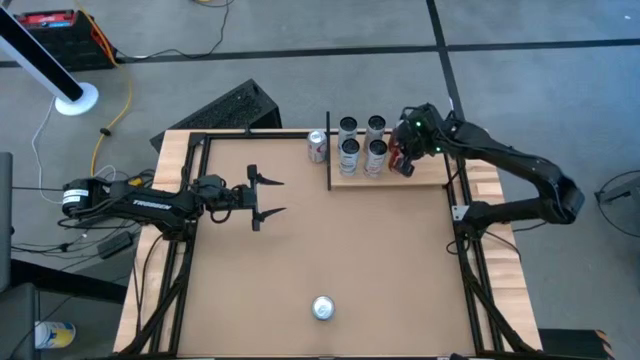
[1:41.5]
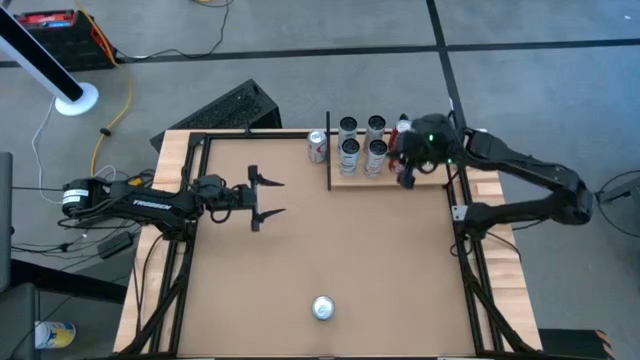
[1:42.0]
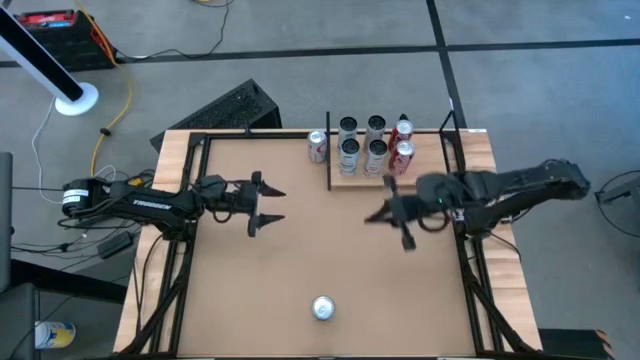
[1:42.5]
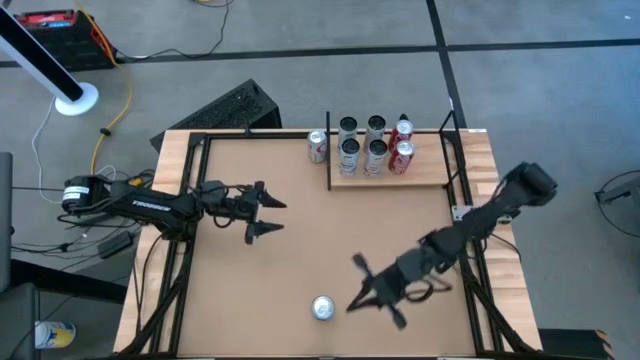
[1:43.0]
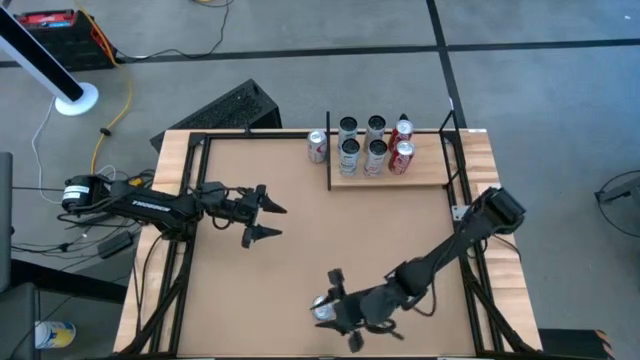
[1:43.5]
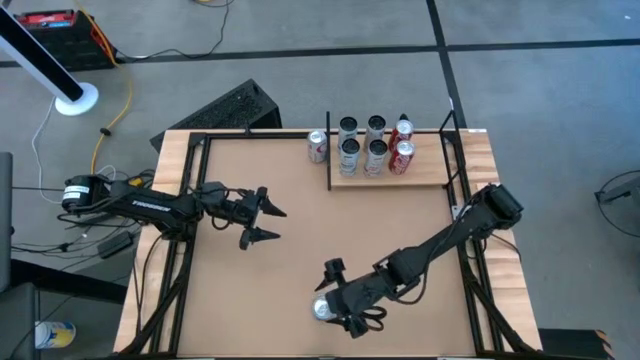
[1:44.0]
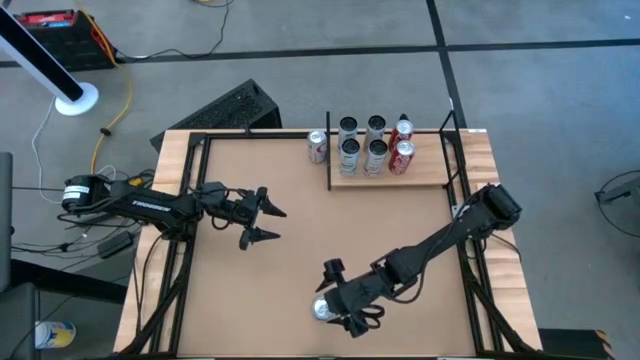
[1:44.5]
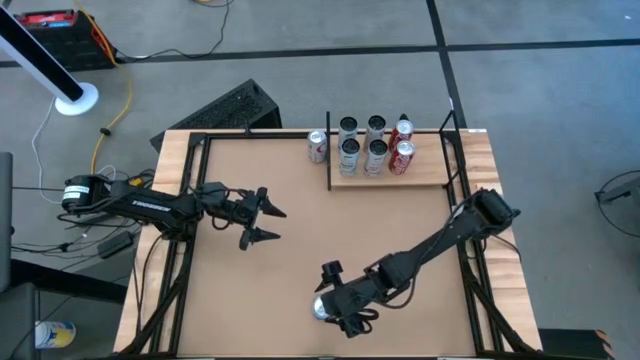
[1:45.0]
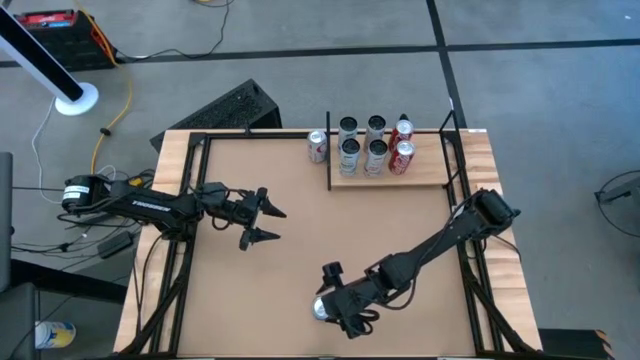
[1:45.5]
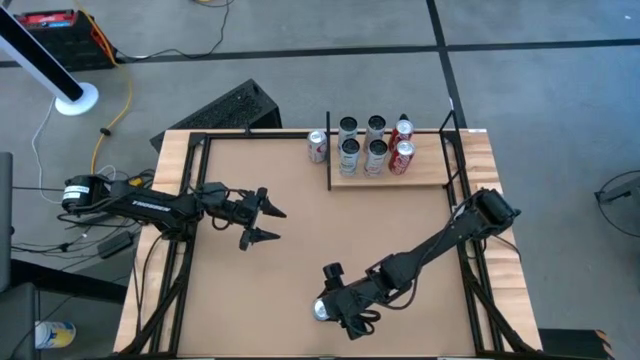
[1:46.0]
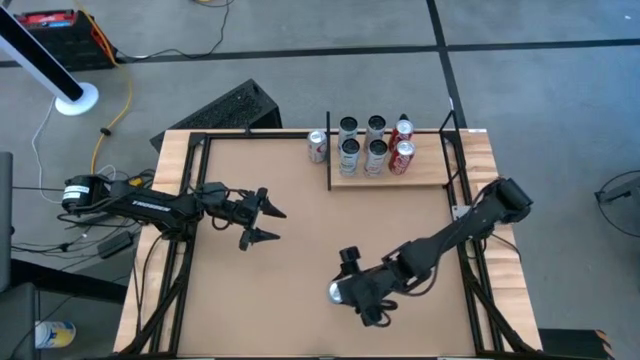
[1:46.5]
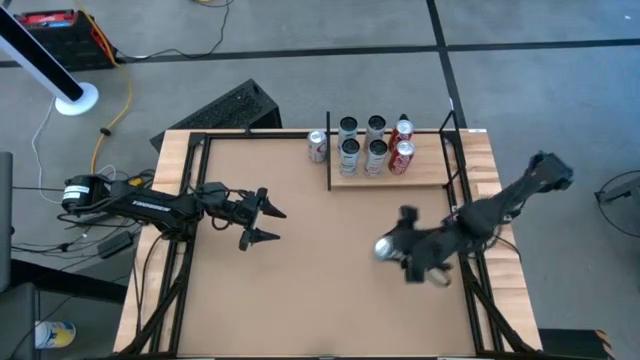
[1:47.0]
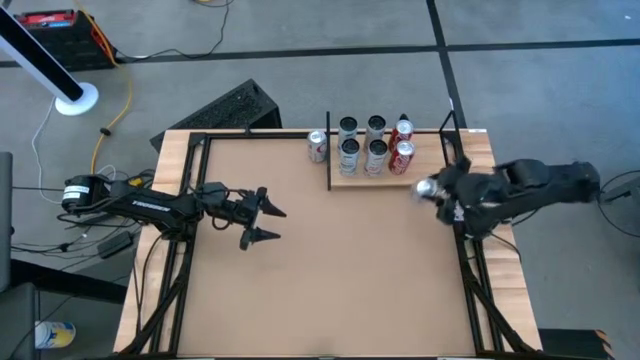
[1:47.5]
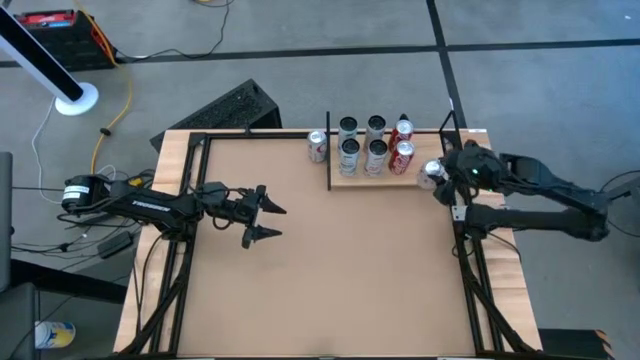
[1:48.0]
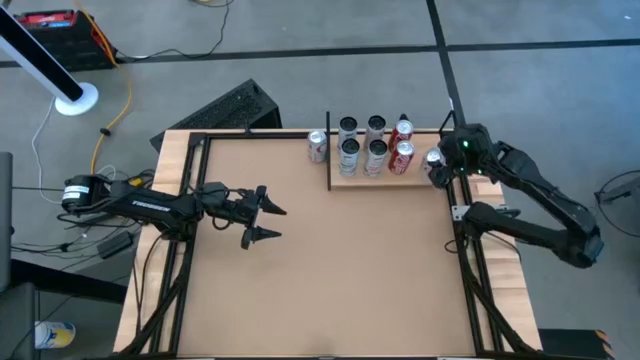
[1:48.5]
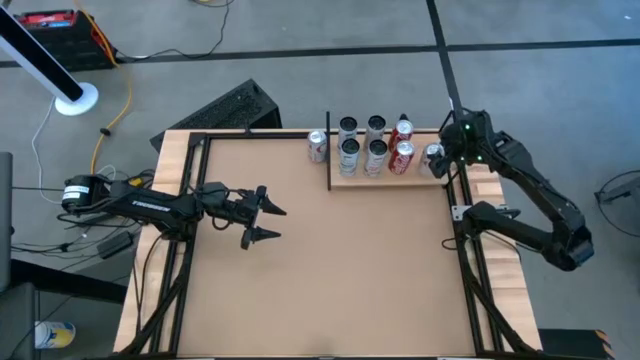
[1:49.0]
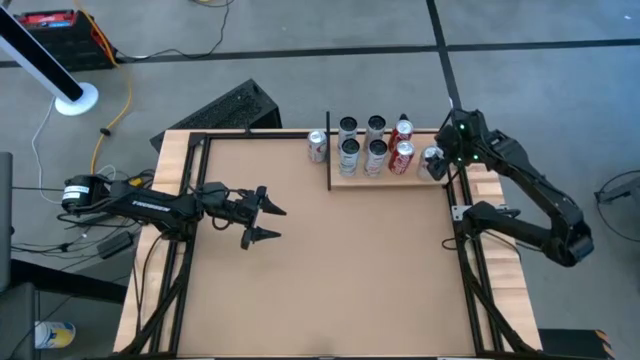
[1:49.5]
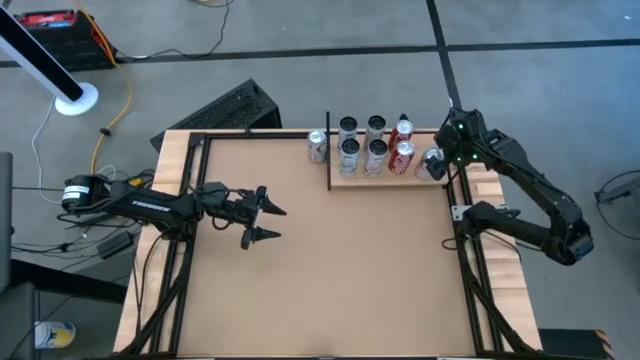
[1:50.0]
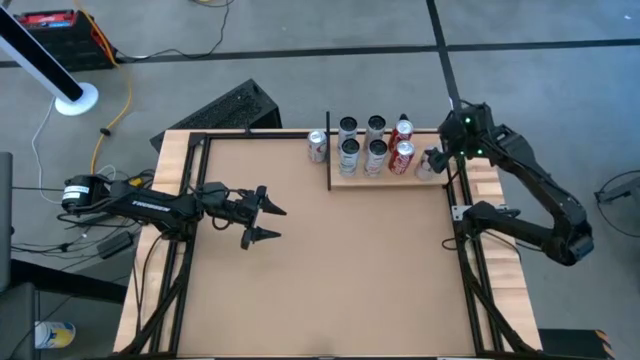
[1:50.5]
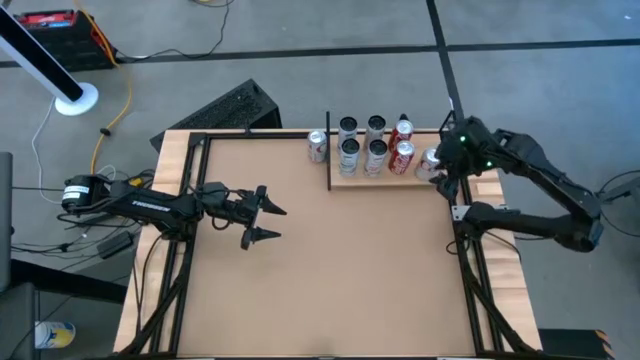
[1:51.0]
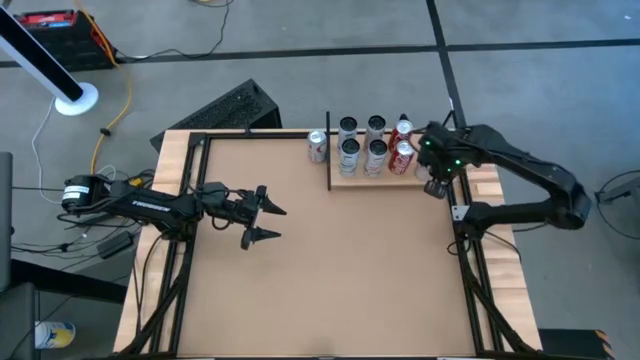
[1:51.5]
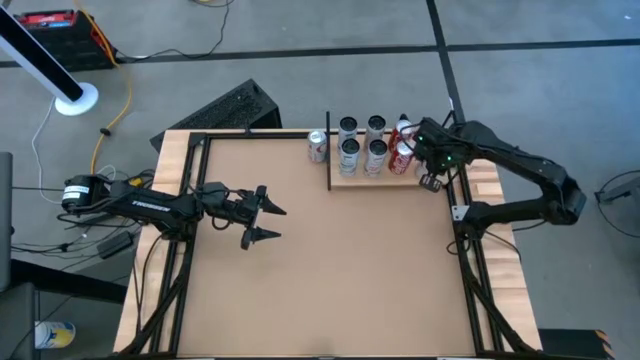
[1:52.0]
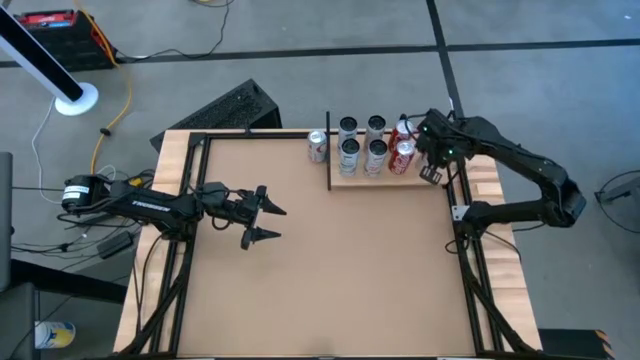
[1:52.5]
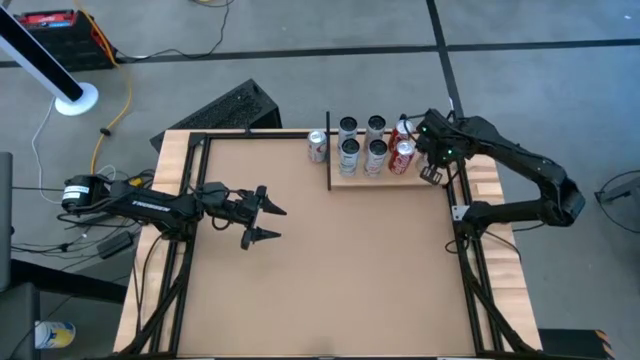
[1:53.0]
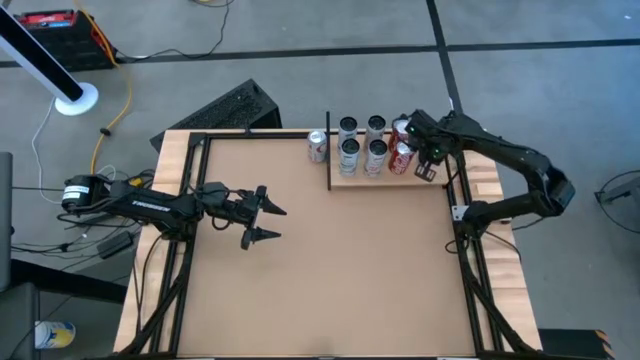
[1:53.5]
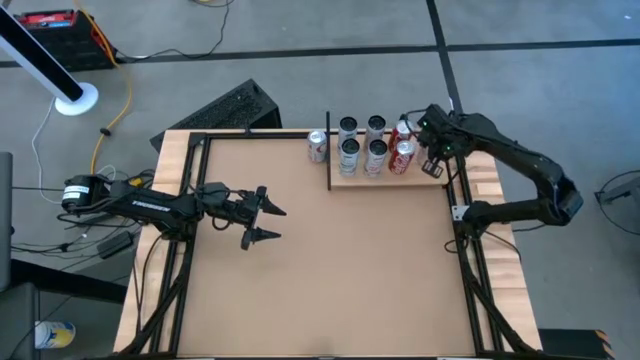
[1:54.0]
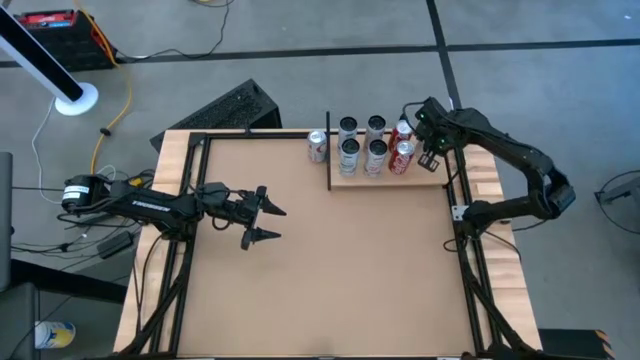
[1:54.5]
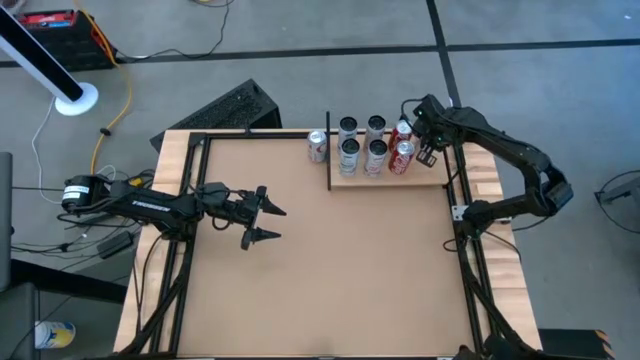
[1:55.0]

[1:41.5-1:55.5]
Task: Place canned beverage on shelf
Put the bottom silver and red soda can on the shelf

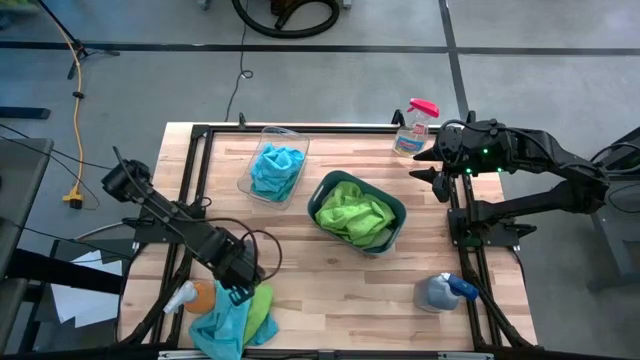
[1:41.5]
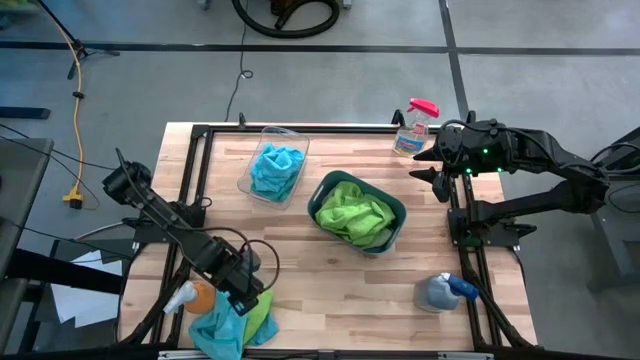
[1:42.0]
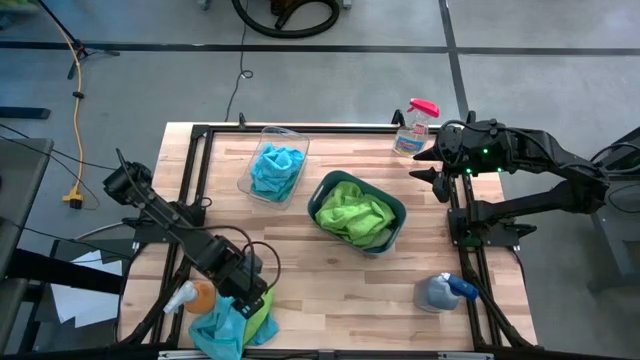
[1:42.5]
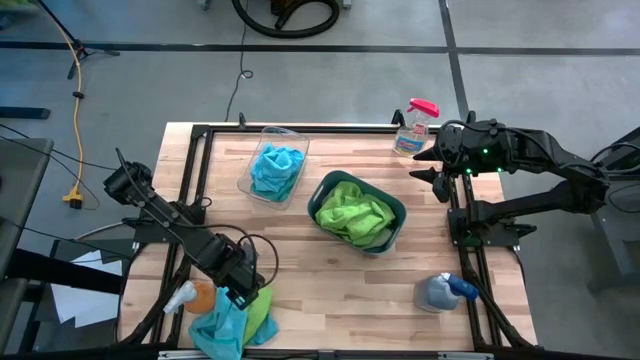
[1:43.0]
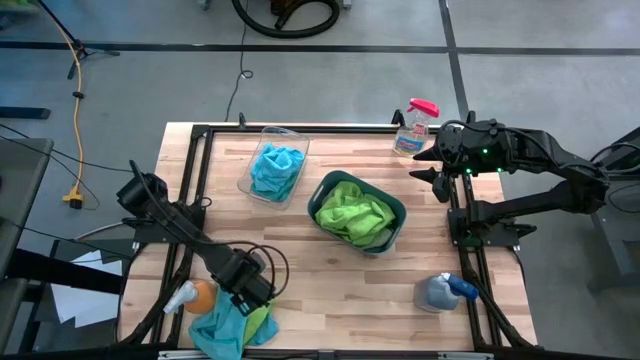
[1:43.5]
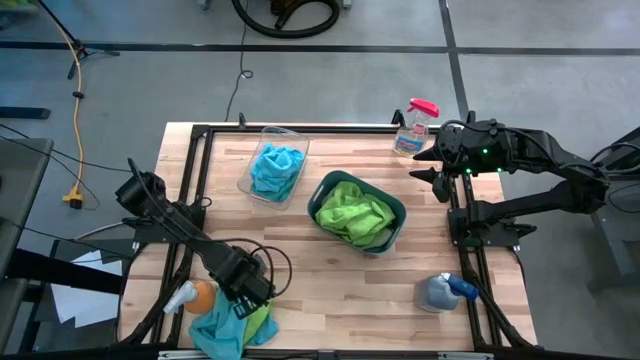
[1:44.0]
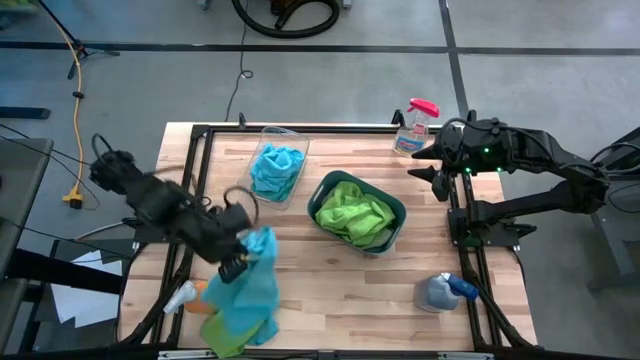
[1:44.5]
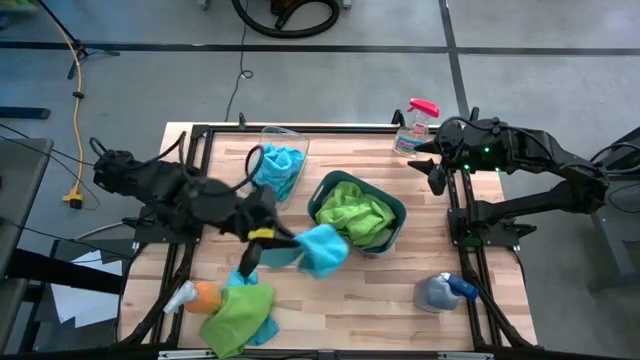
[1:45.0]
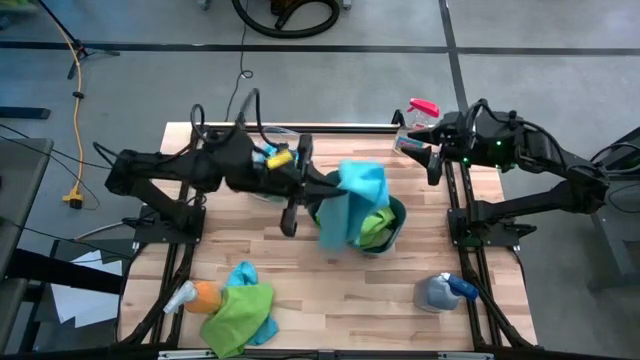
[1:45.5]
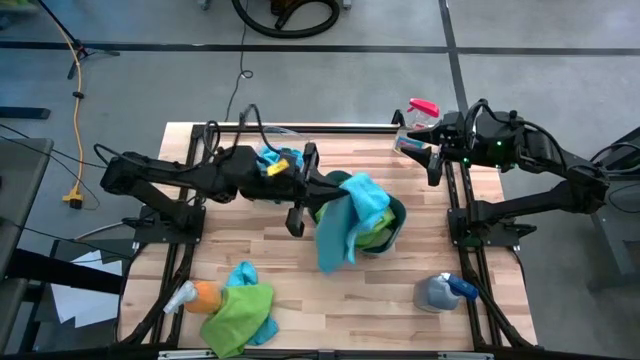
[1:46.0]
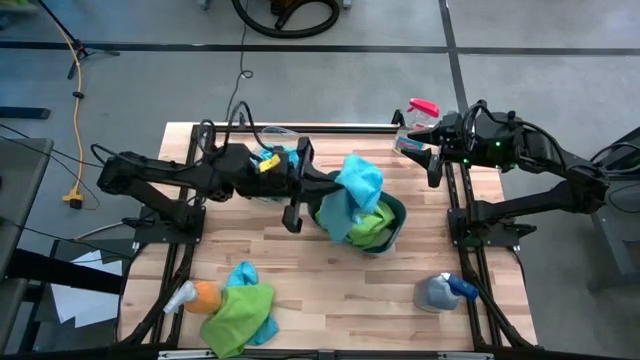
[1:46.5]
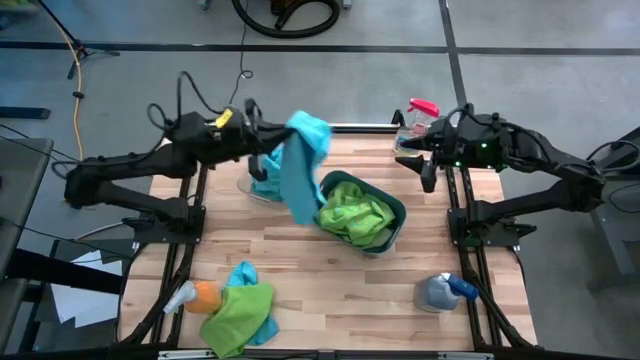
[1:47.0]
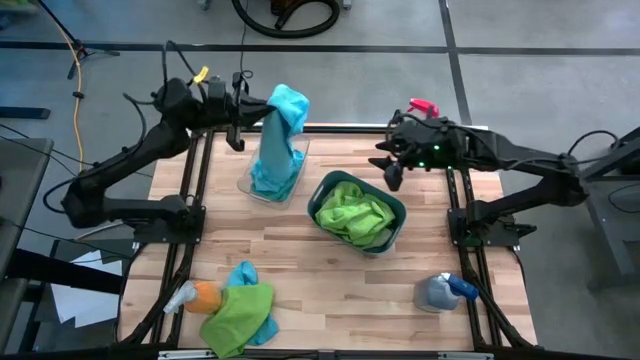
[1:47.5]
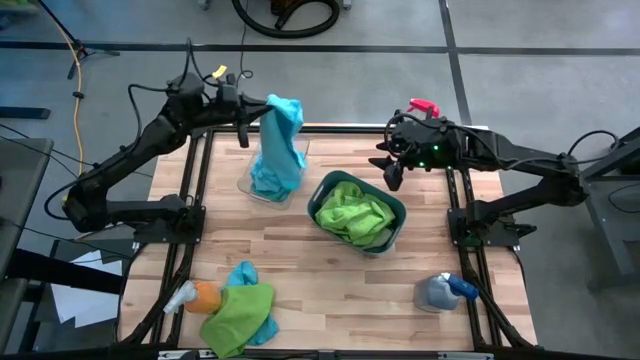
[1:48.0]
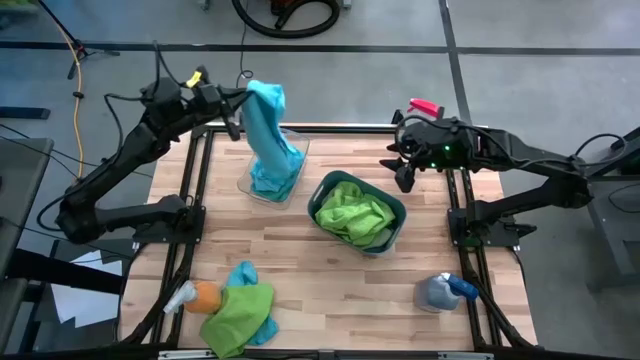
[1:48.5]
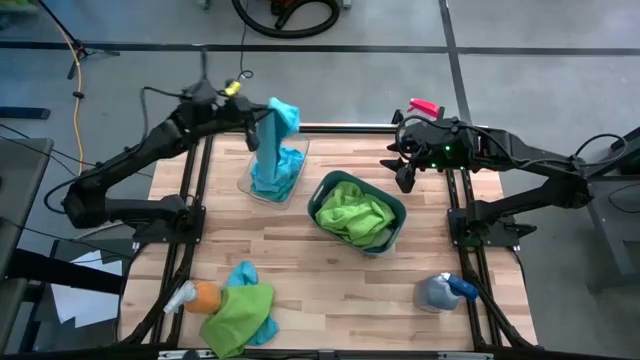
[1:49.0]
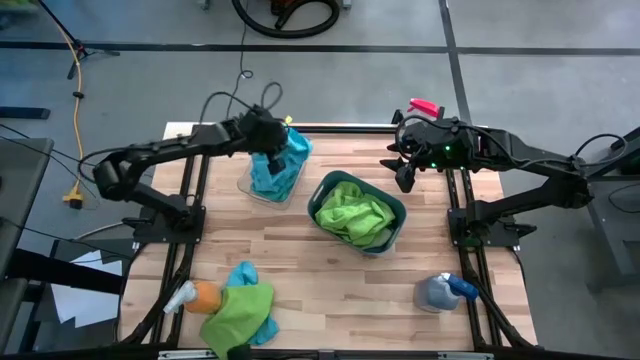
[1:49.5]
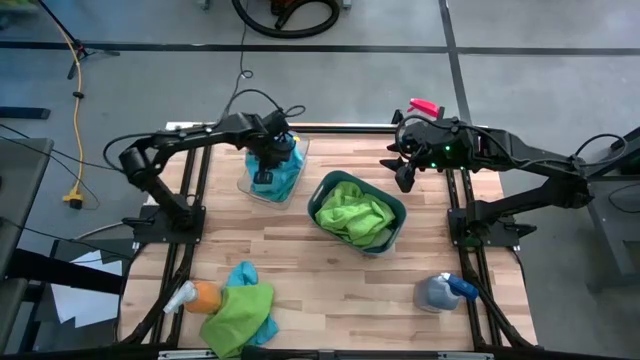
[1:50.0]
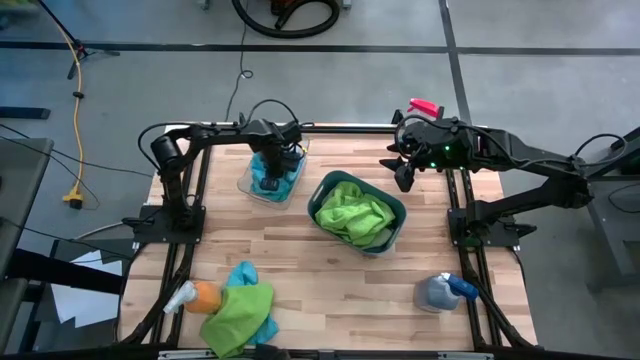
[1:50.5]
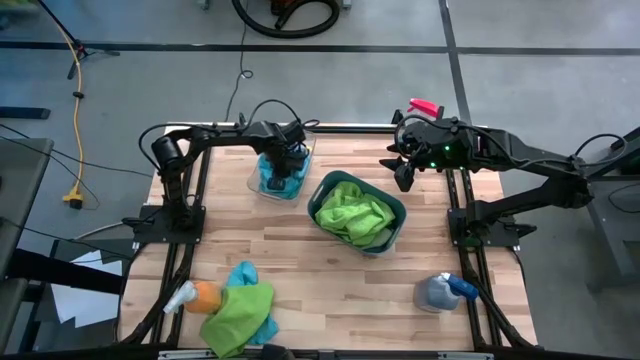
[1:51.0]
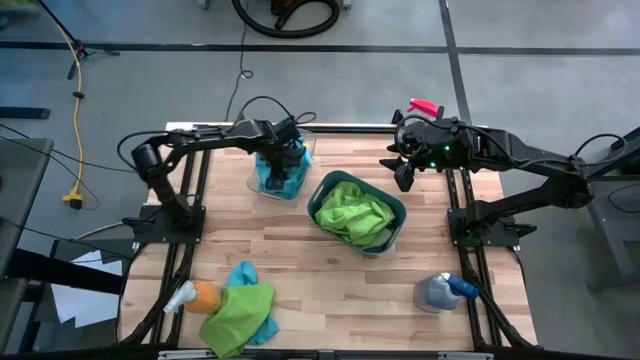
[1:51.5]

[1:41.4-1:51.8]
Task: Sort microfiber towel by color & place in baskets
Put the blue microfiber towel into the transparent bin
